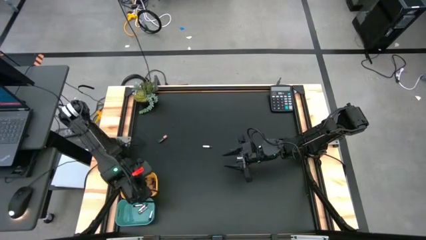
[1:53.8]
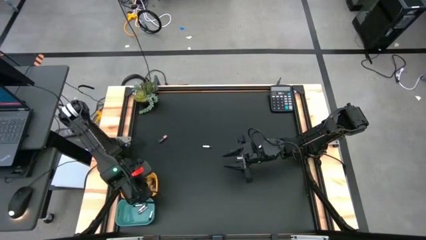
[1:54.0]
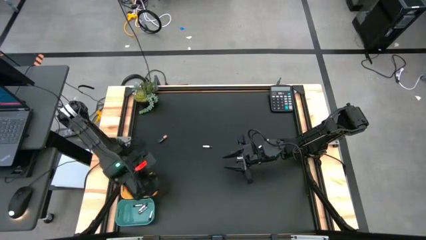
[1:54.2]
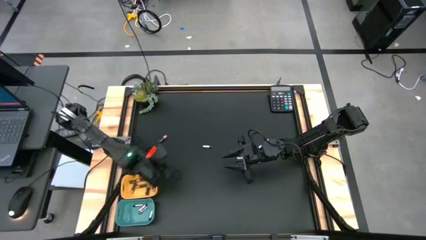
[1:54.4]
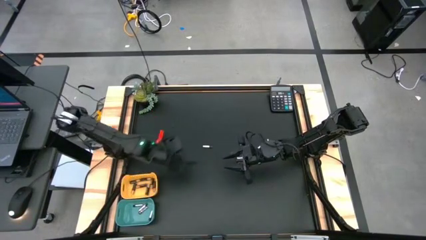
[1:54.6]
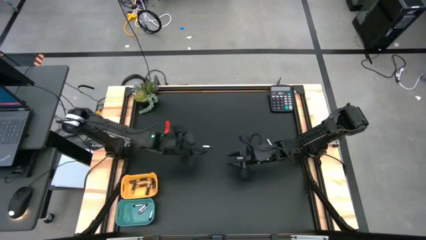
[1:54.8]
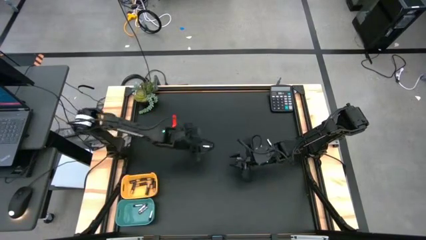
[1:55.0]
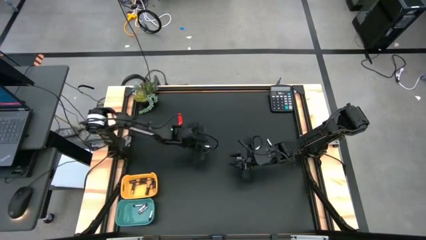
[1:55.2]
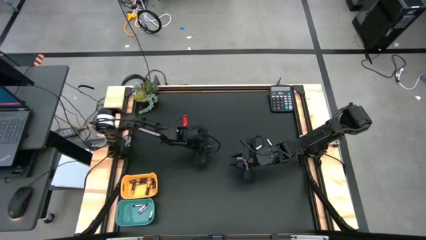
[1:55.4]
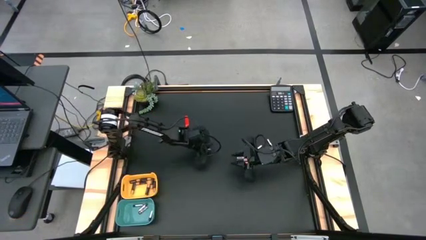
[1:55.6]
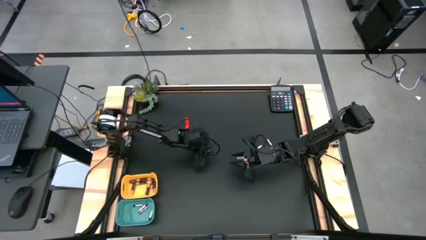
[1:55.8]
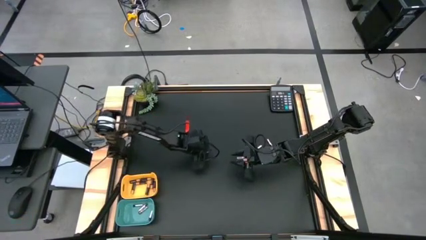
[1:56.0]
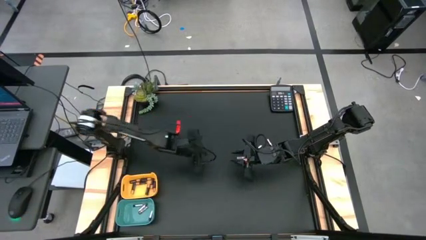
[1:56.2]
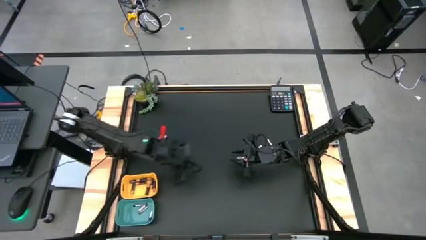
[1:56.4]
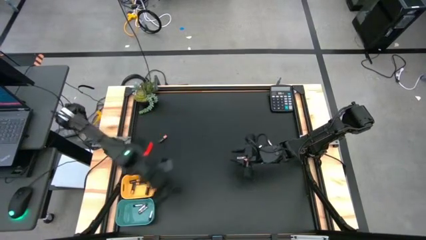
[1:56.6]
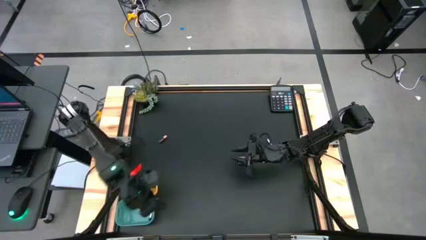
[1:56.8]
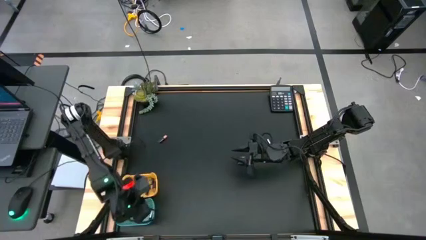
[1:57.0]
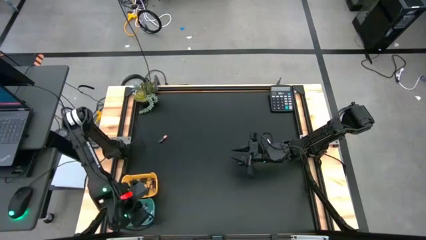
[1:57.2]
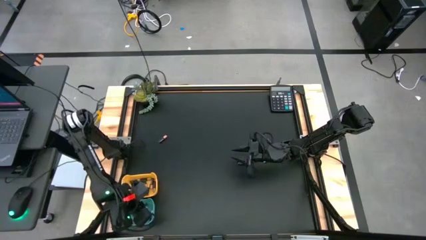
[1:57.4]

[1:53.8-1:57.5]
Task: Sort batteries
Put the silver battery into the green bin

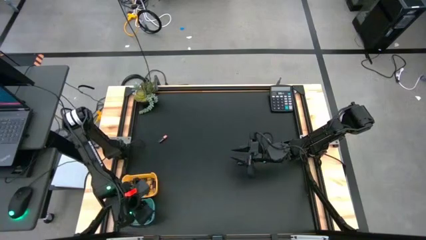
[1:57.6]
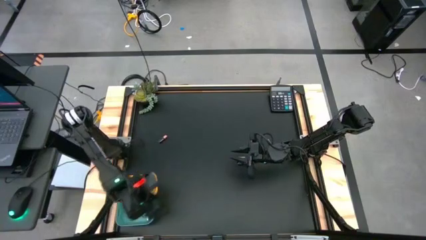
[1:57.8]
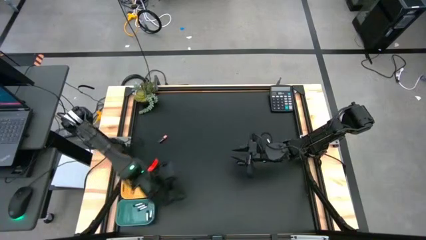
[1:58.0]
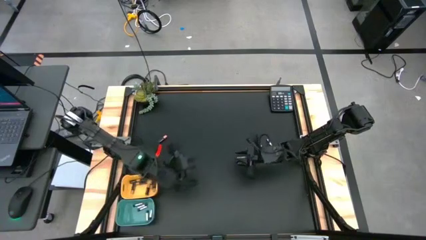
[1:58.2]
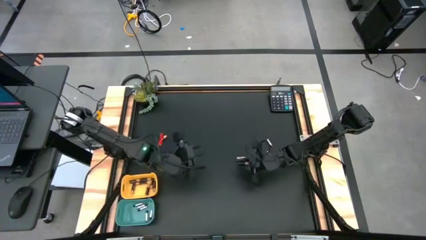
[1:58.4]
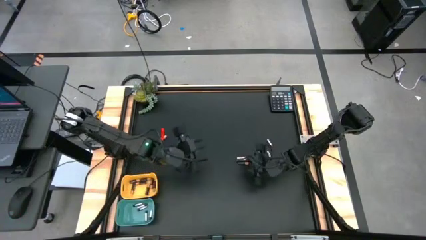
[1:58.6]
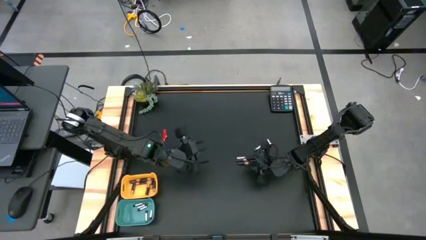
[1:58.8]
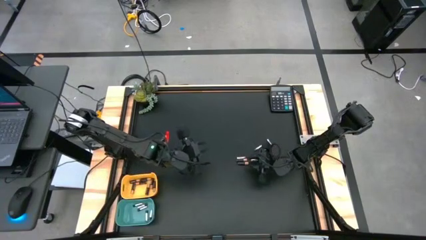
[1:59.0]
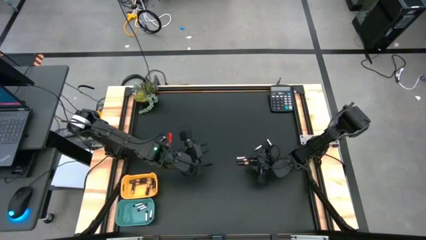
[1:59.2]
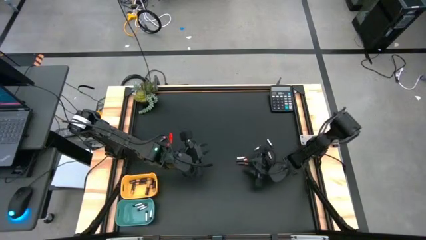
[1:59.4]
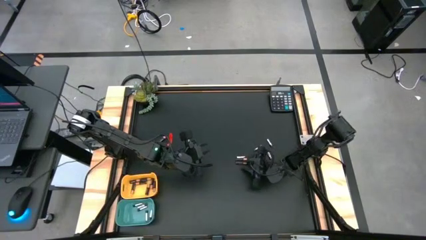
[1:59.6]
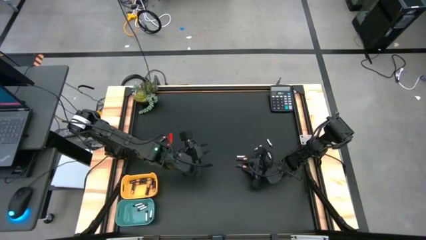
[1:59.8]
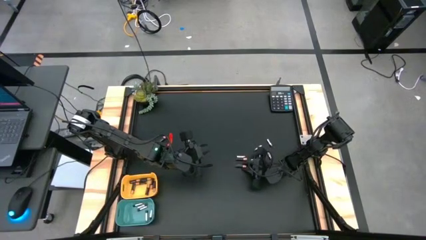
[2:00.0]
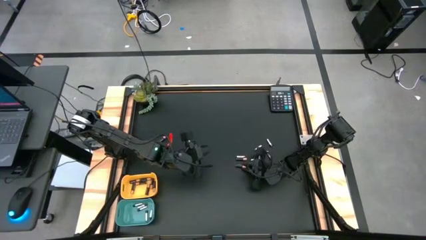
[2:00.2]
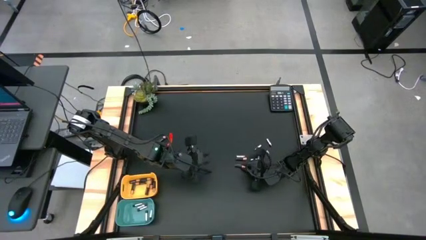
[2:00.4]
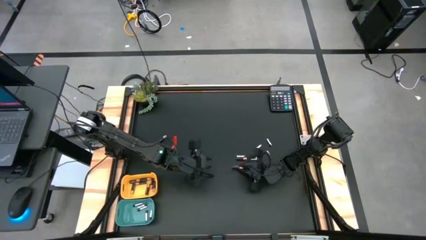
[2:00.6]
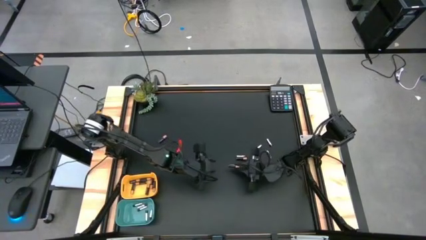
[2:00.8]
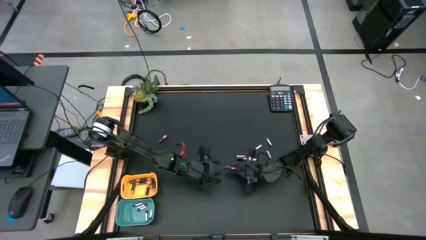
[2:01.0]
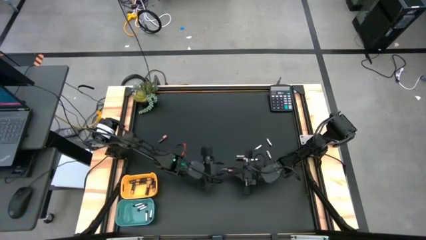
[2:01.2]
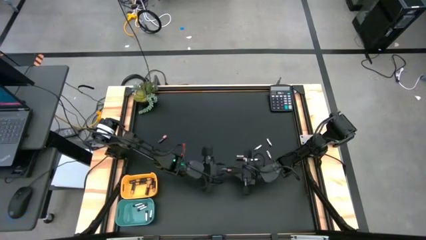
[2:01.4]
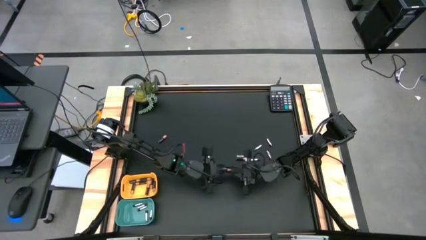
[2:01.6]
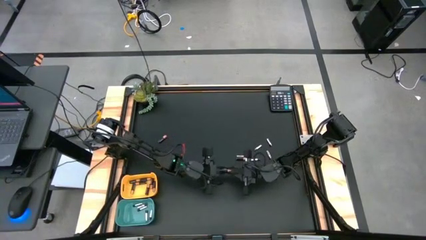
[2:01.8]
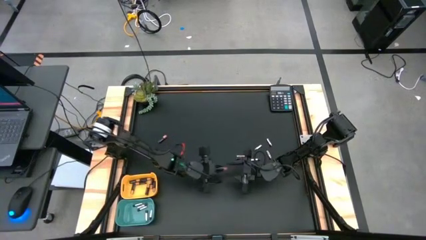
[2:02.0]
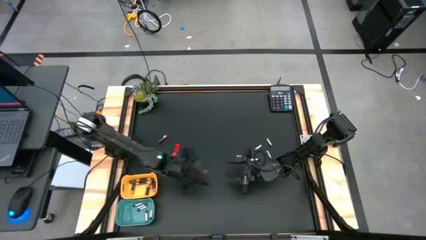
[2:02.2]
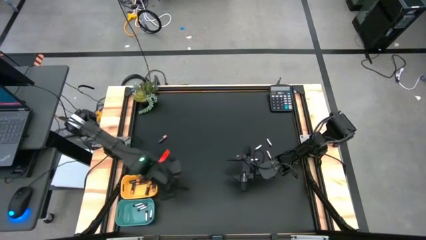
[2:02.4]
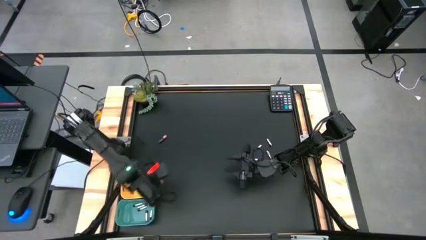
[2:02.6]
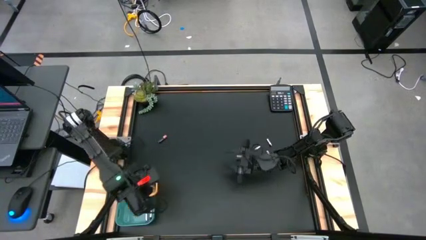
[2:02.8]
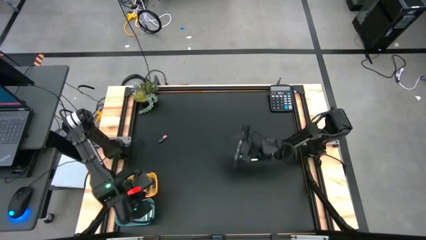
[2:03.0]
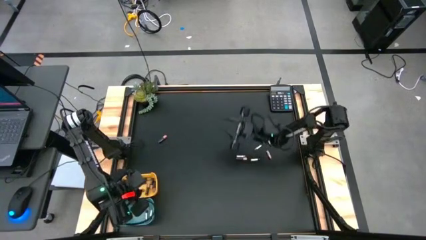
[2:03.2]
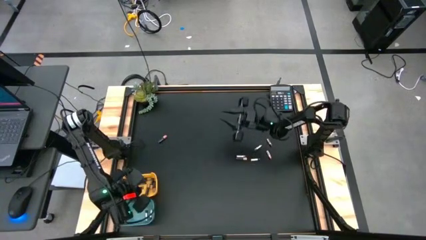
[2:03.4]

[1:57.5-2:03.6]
Put the bottom black battery into the yellow bin

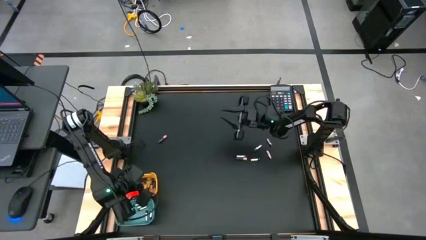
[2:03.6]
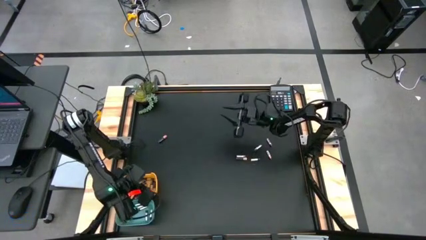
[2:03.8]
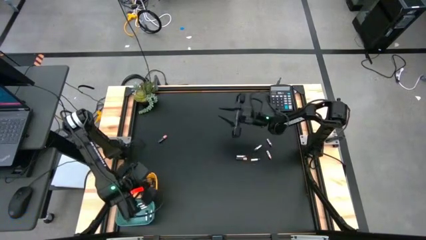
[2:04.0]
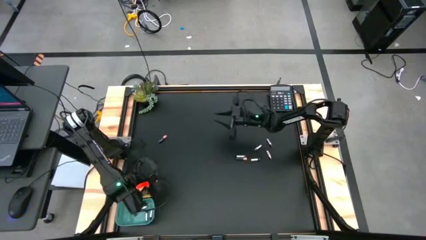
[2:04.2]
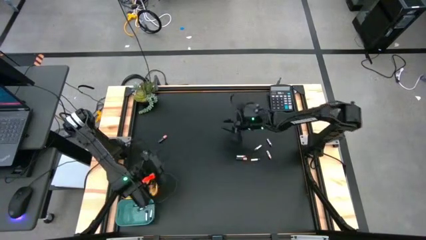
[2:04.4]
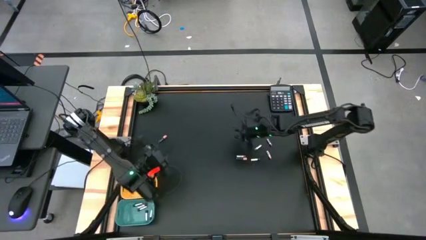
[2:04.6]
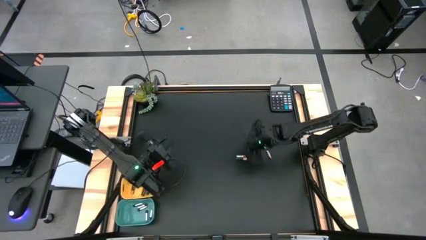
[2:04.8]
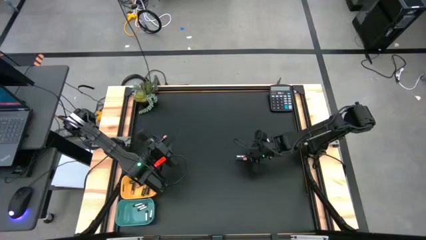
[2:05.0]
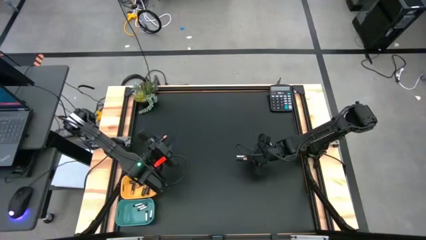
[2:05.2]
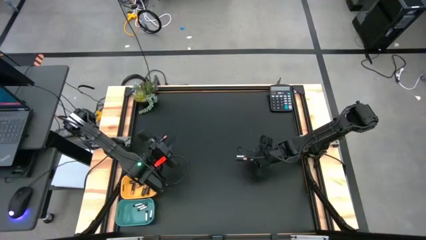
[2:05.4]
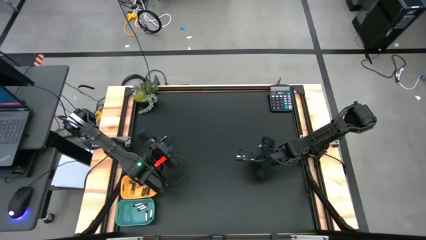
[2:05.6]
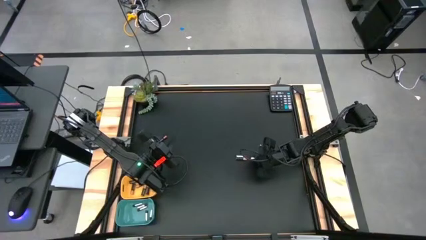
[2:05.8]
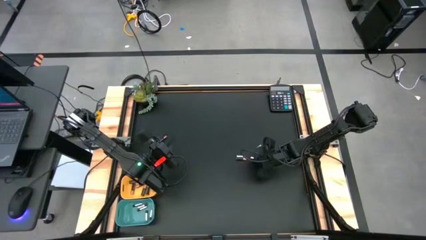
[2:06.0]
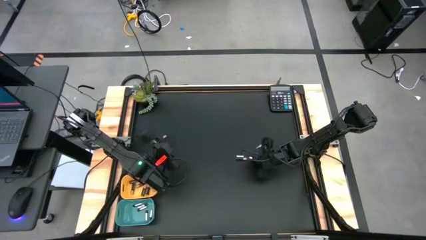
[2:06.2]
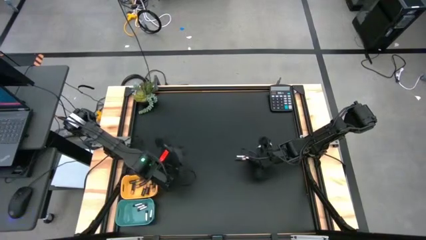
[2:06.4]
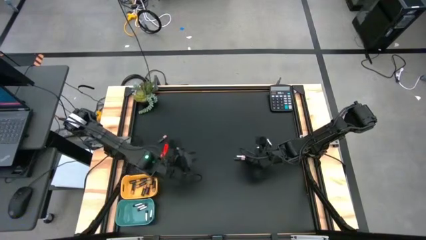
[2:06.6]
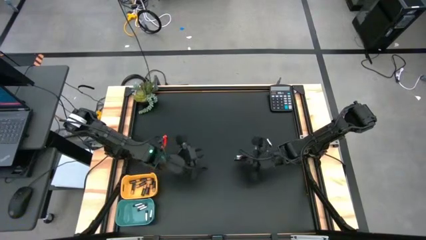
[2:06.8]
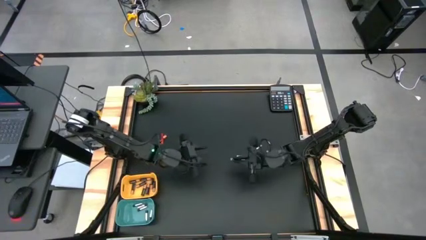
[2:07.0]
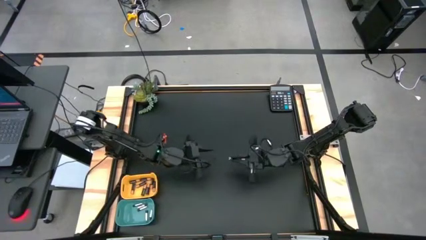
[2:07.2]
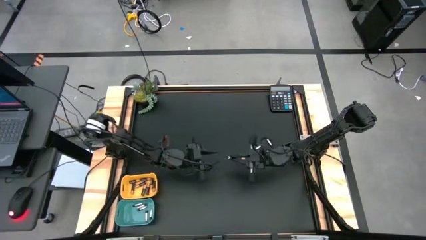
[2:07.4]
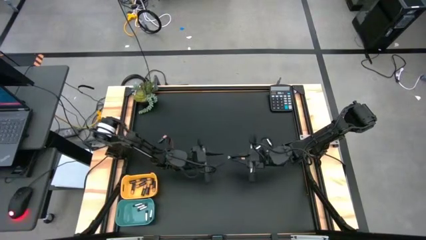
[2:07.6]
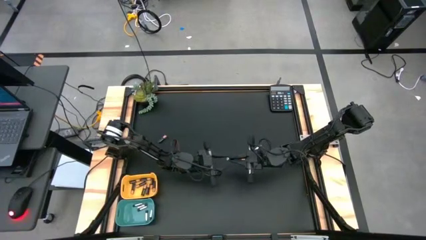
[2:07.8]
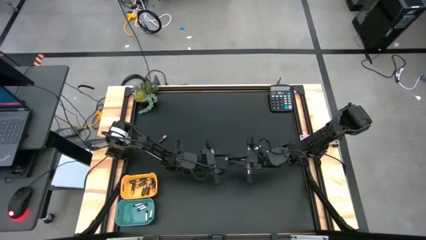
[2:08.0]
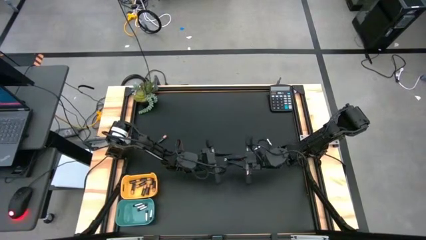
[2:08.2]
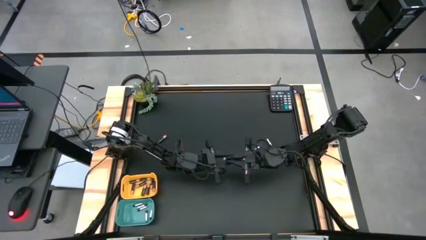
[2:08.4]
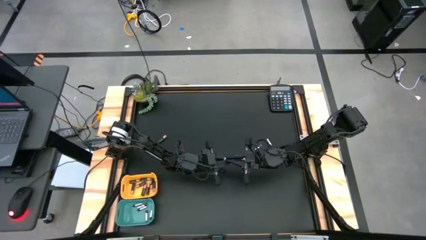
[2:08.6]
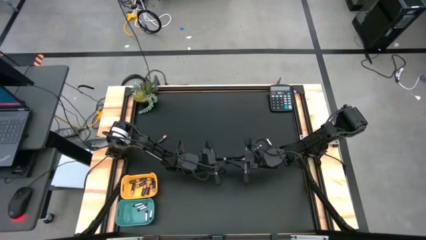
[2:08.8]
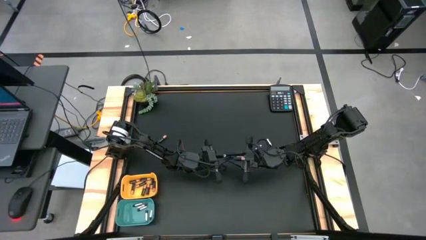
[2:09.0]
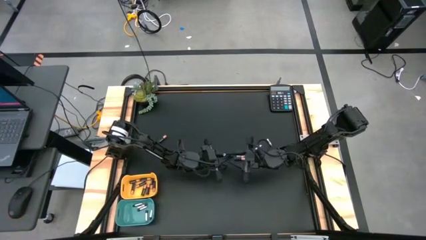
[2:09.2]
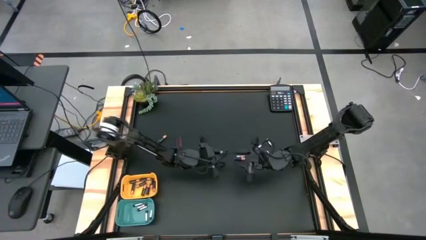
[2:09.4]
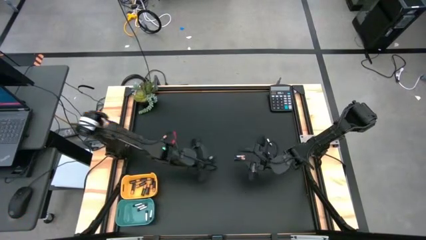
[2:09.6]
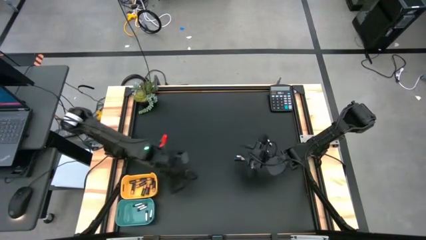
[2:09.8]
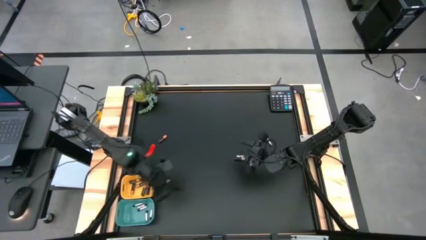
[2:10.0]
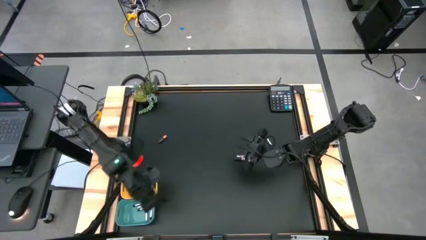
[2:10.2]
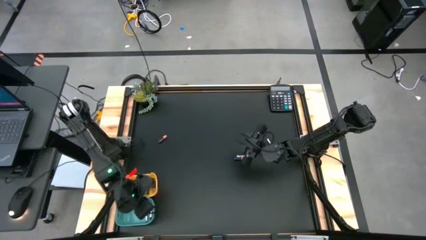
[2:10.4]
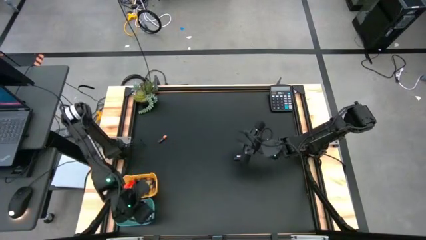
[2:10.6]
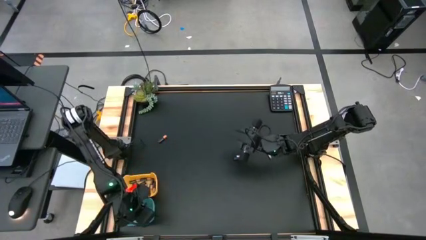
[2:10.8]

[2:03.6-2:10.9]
Put the silver battery into the green bin
